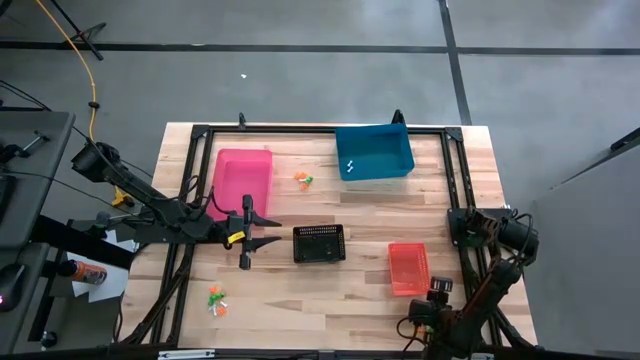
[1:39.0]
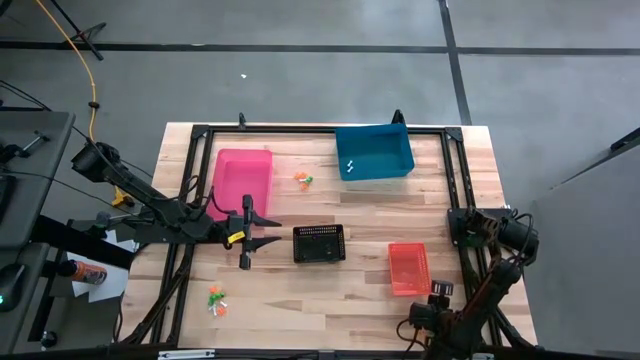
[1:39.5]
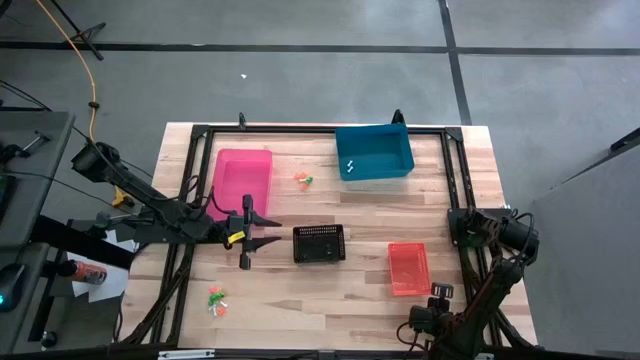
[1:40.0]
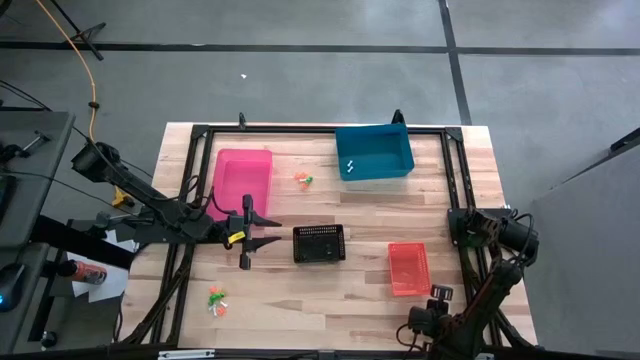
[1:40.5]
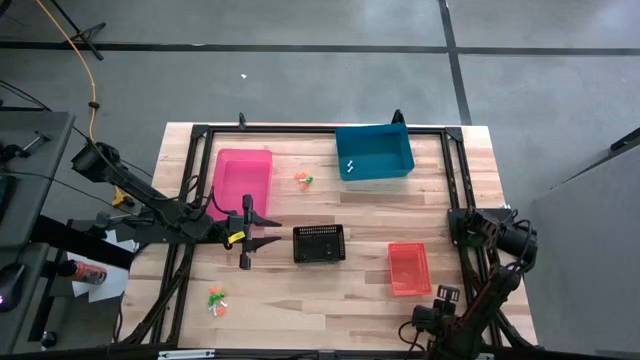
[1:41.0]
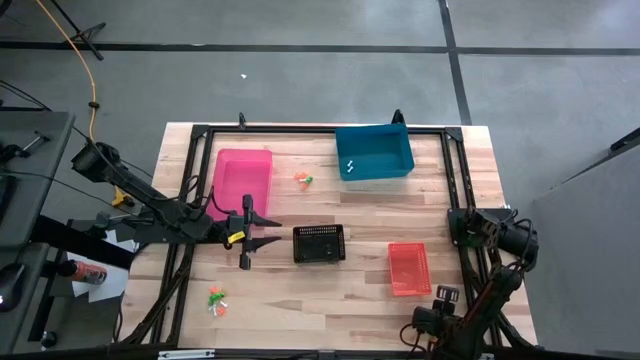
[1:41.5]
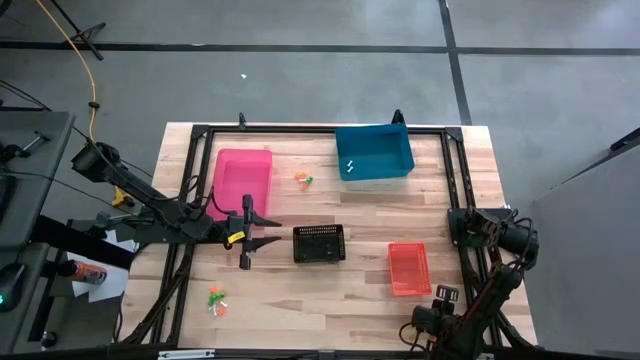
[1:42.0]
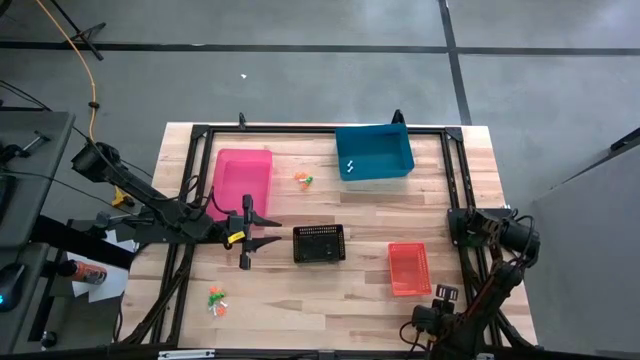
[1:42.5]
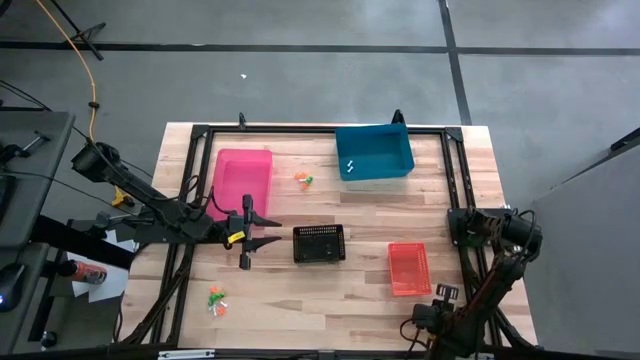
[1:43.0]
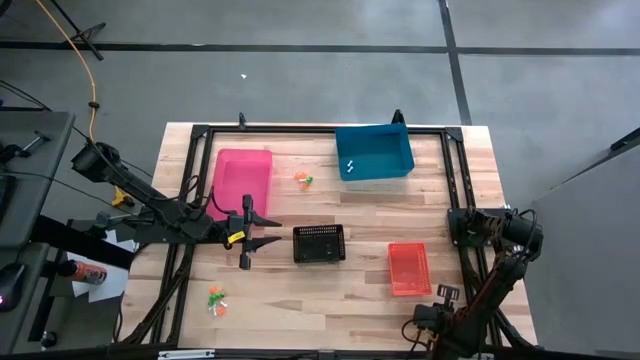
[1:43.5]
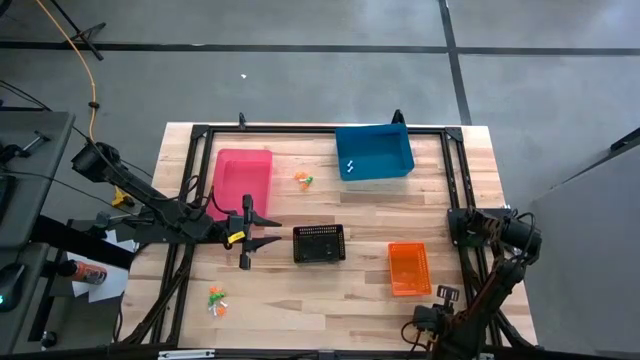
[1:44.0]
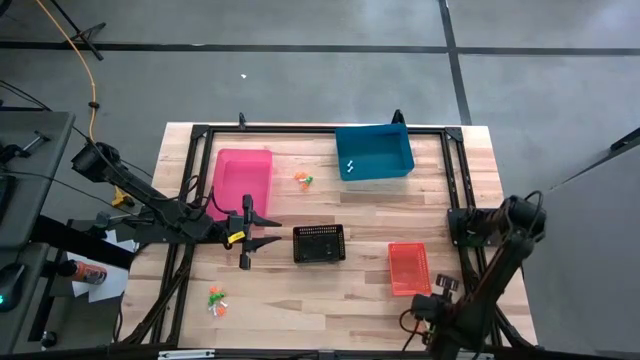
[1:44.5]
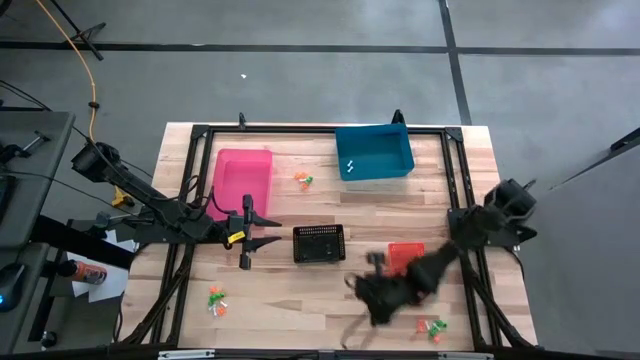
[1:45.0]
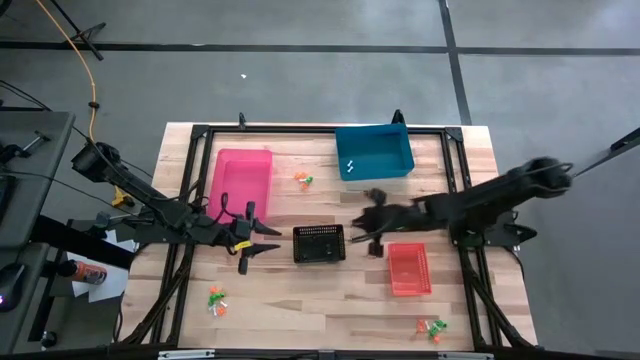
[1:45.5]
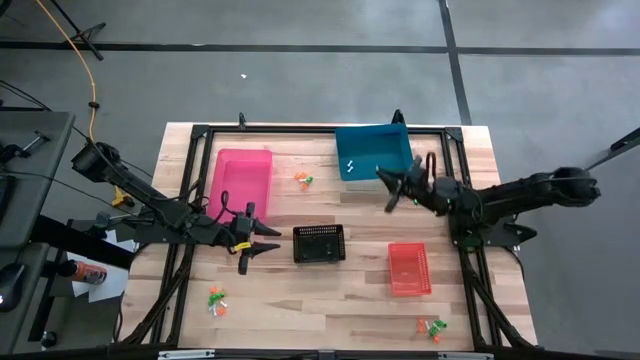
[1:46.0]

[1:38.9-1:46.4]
Task: Sort Halloween decoration
Put the white bone toy into the blue bin

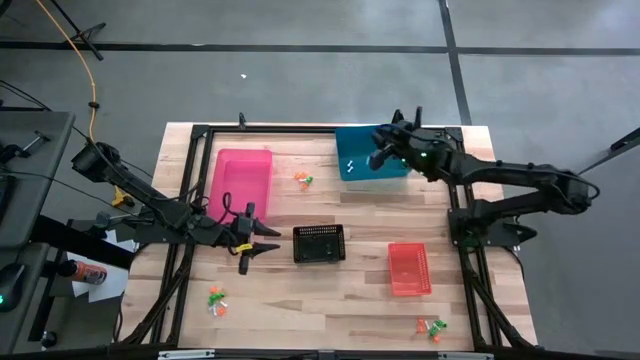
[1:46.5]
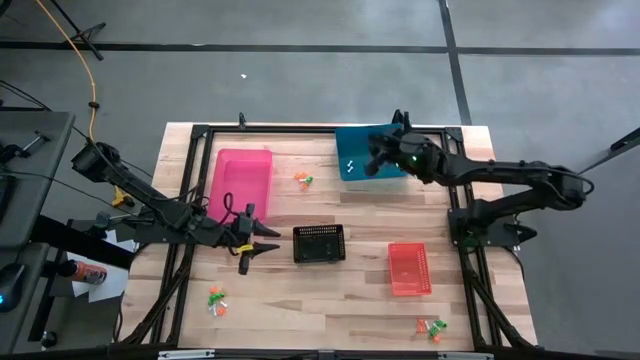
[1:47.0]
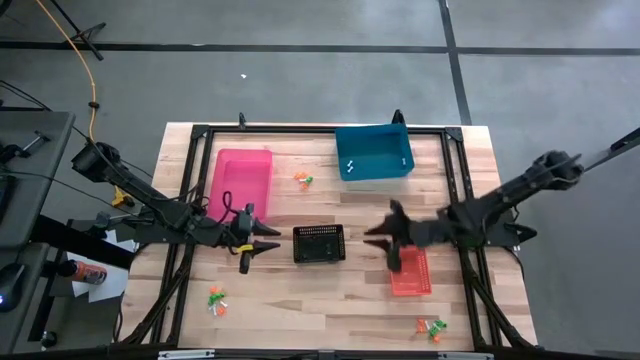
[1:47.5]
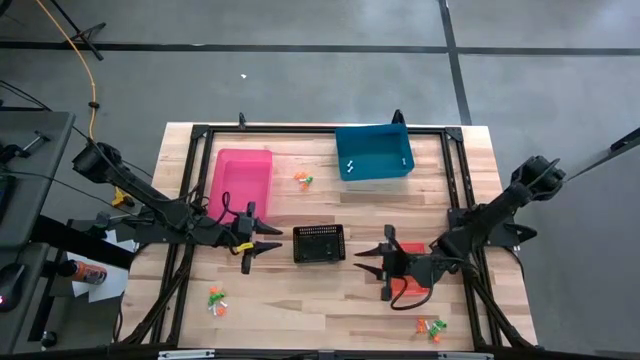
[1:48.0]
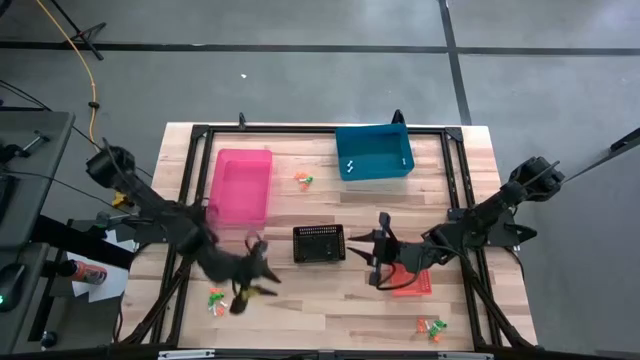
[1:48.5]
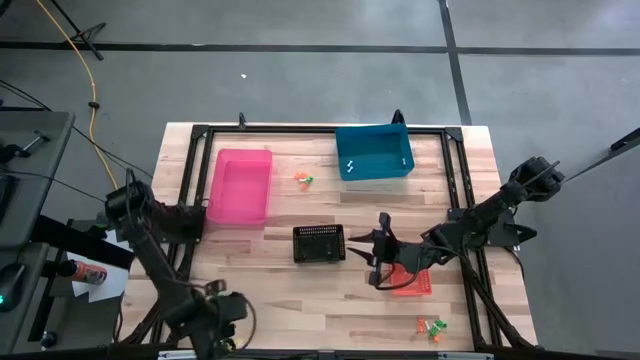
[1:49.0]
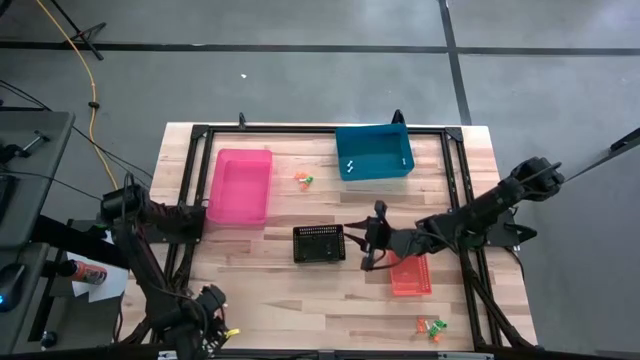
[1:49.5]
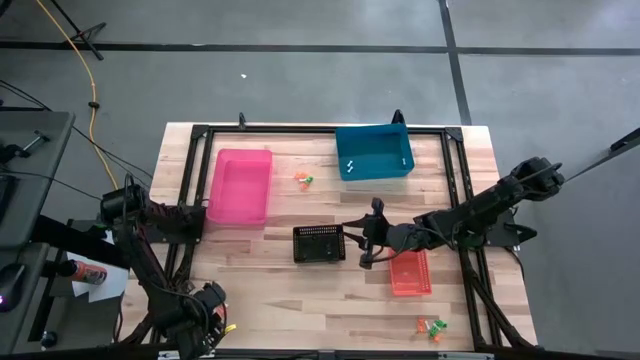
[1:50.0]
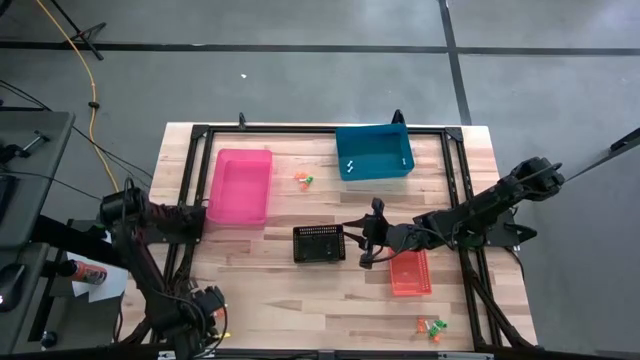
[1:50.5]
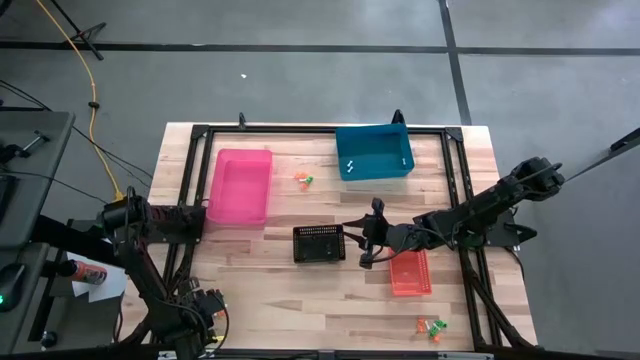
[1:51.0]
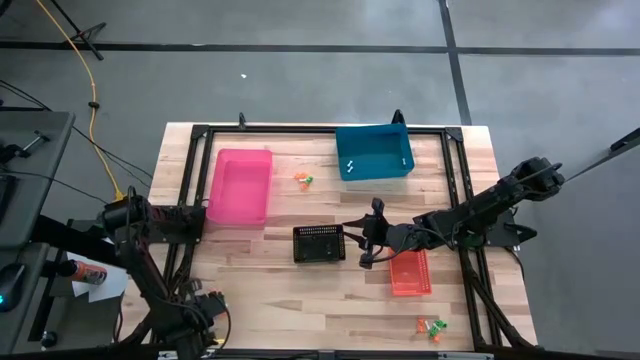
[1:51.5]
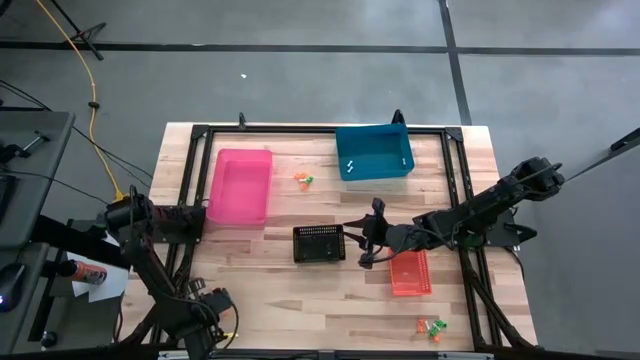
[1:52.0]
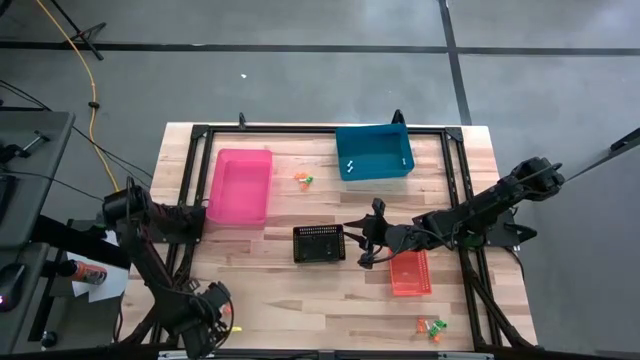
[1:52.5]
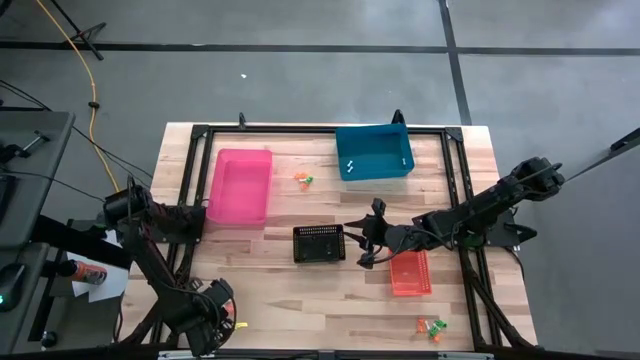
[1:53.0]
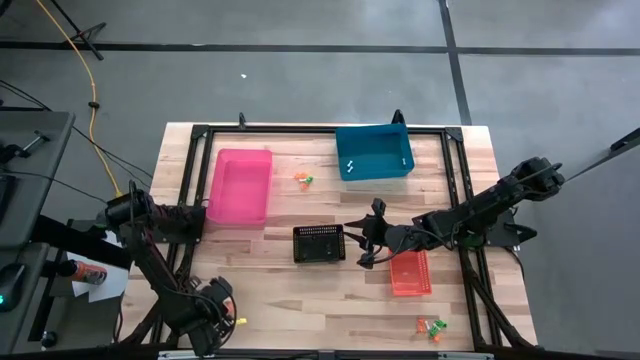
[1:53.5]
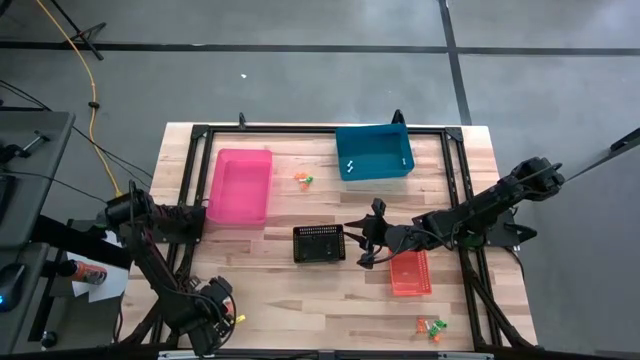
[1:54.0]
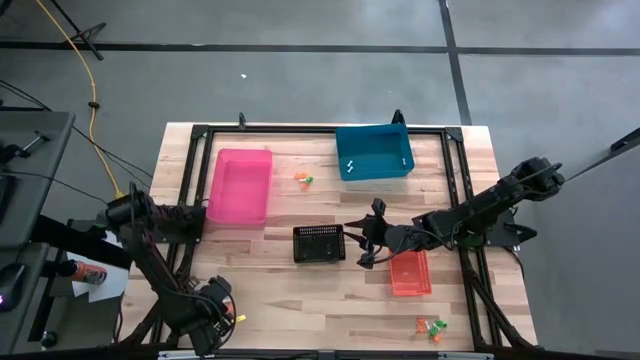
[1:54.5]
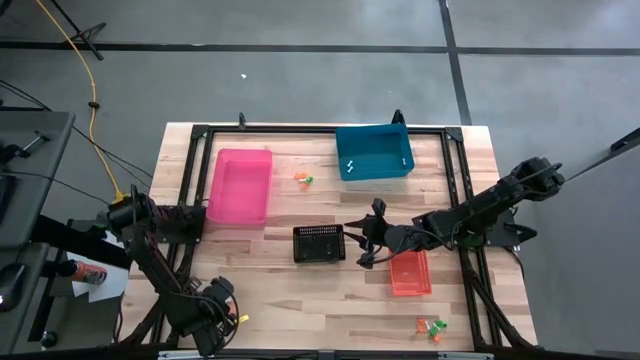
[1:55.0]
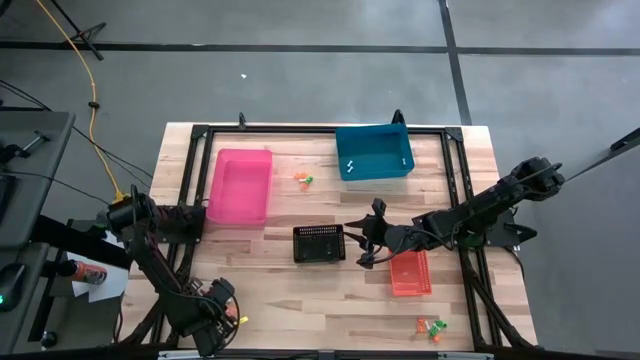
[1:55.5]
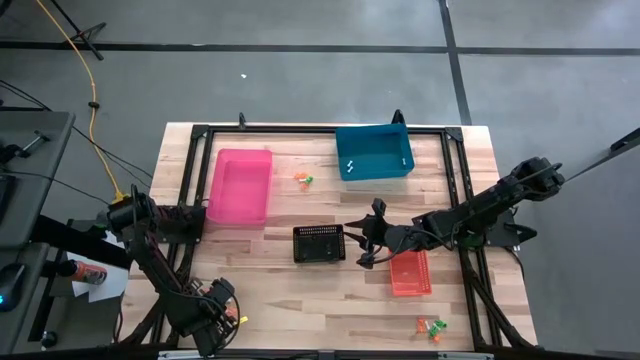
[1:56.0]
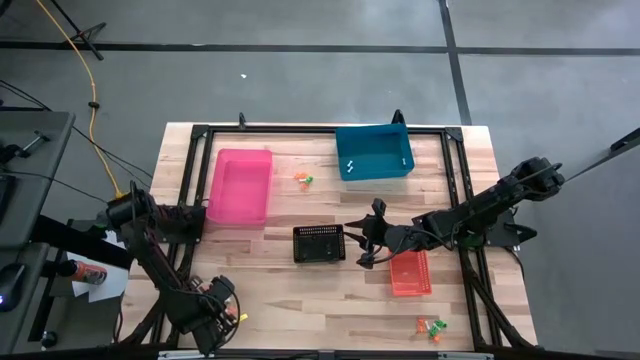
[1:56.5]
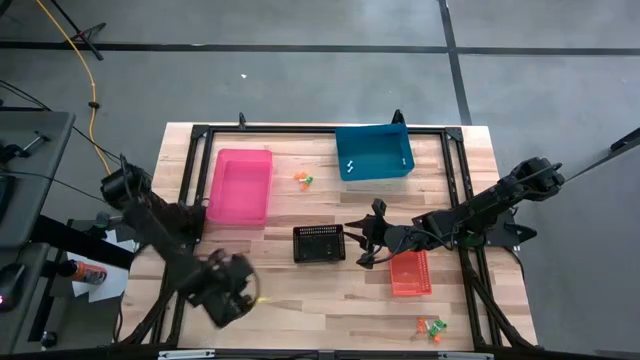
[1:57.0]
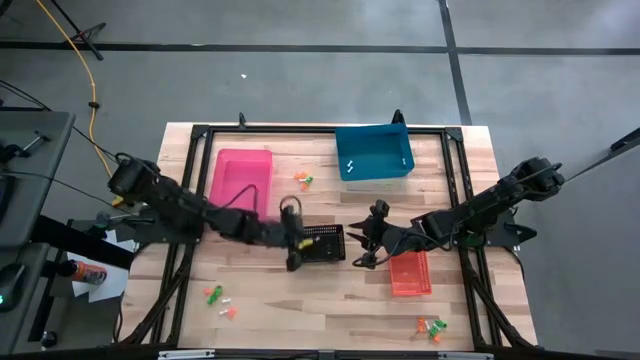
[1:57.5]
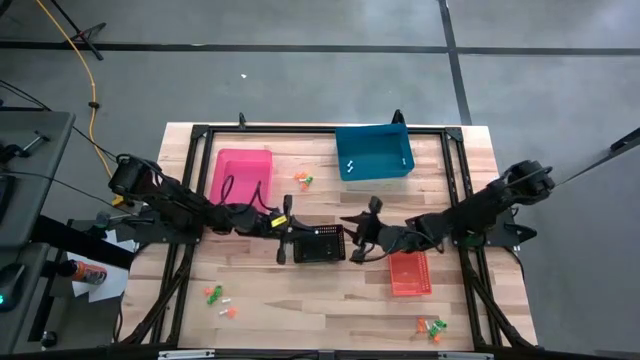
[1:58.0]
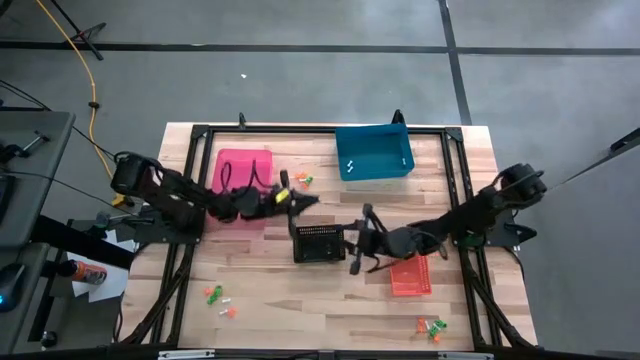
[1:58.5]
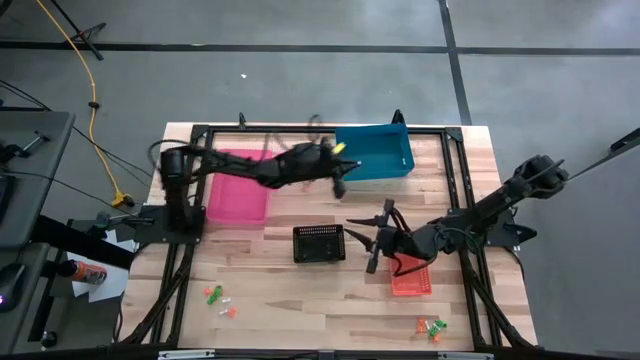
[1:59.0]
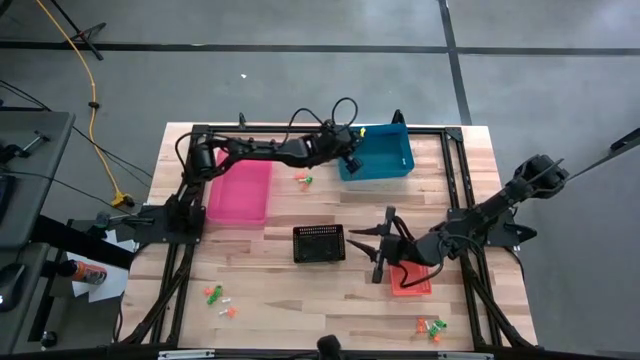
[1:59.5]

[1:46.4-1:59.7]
Put the white bone toy into the blue bin

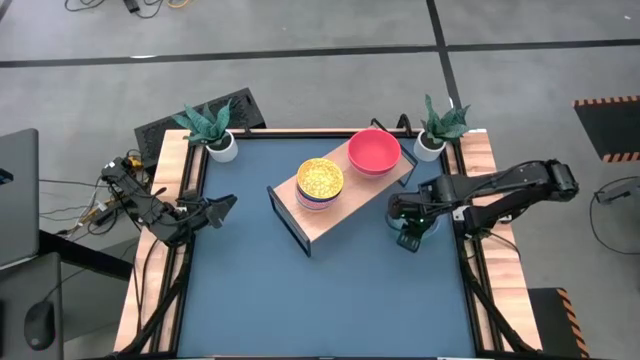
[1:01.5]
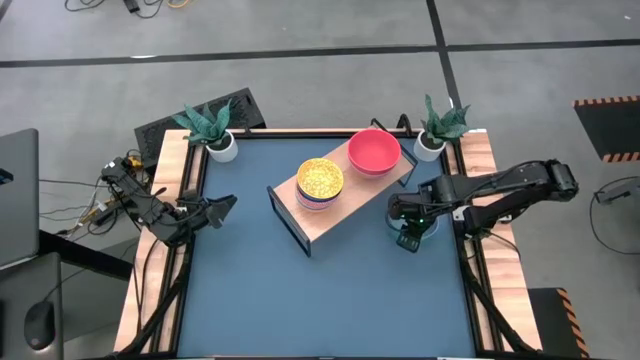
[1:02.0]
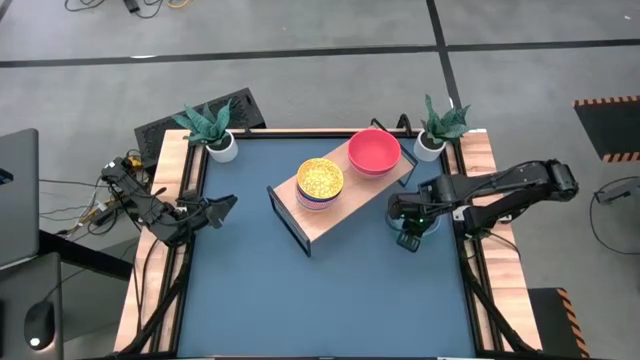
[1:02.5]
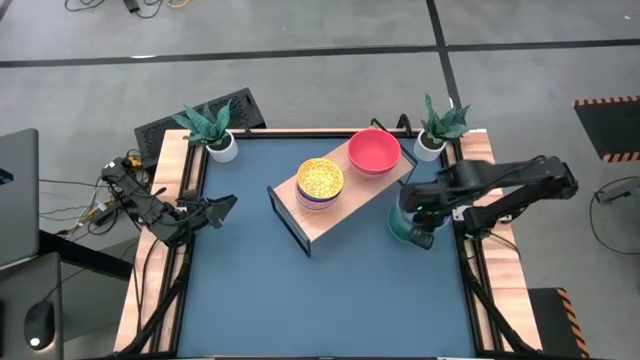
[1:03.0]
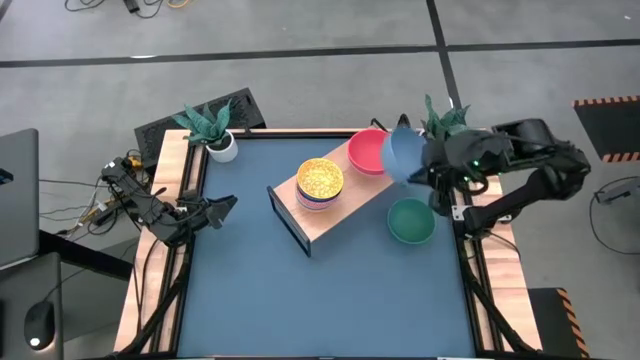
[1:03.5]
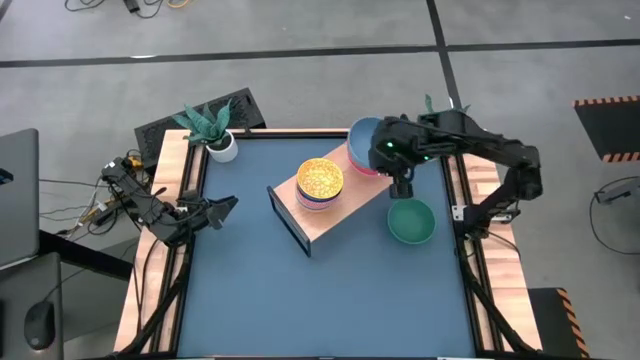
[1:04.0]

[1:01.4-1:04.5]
Task: Place and stack bowls onto a shelf
Stack the blue bowl on top of the red bowl on the shelf
